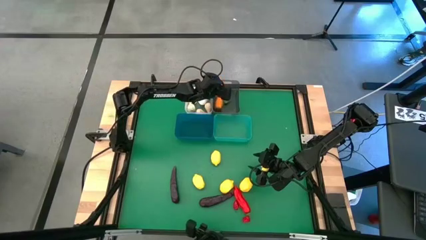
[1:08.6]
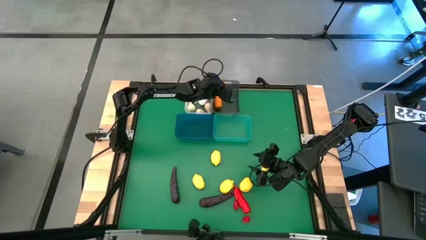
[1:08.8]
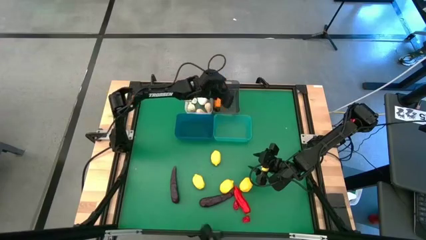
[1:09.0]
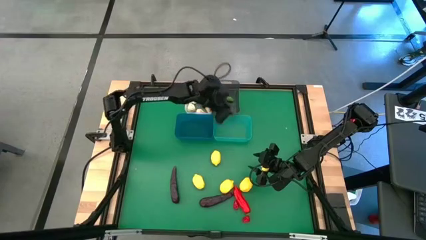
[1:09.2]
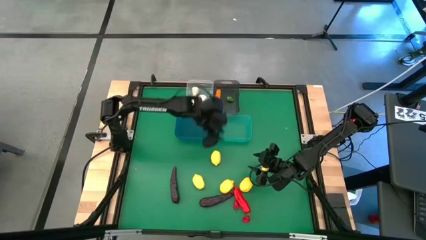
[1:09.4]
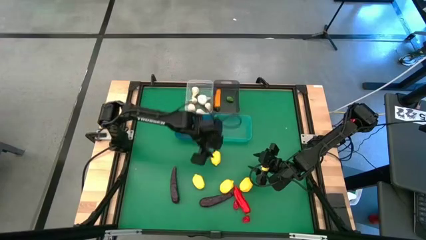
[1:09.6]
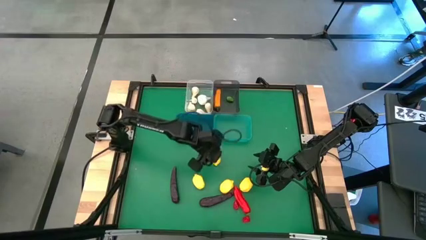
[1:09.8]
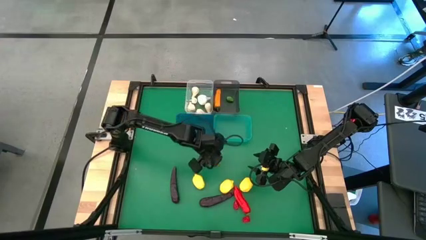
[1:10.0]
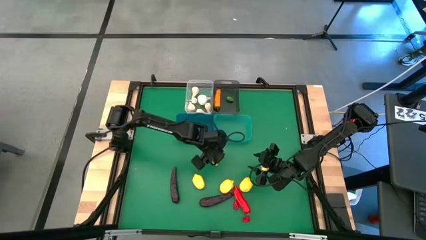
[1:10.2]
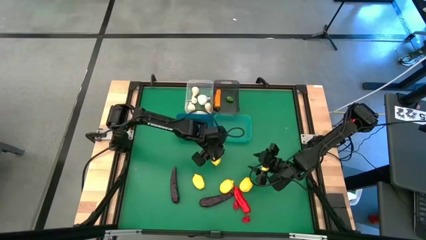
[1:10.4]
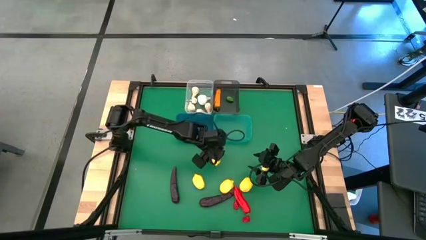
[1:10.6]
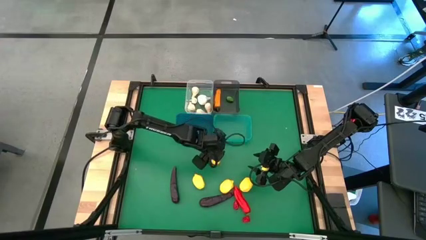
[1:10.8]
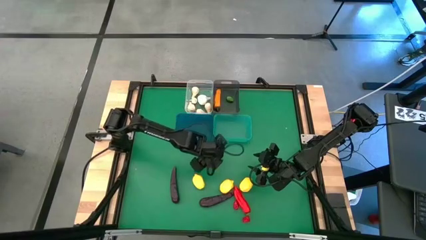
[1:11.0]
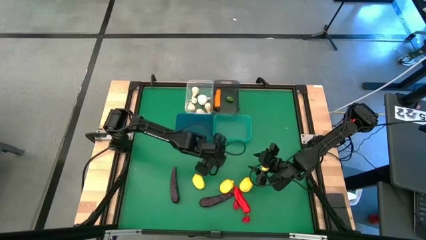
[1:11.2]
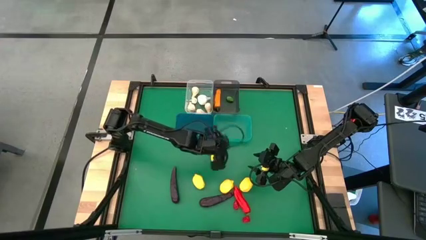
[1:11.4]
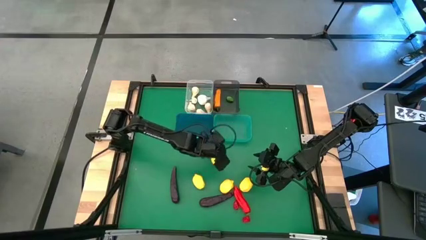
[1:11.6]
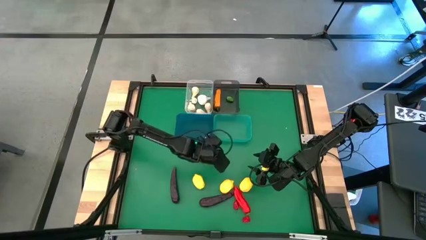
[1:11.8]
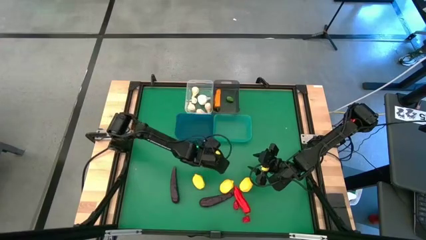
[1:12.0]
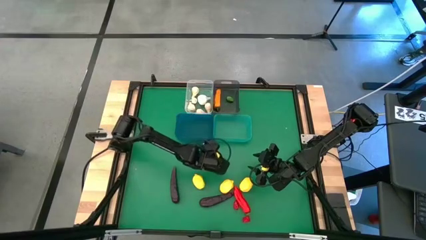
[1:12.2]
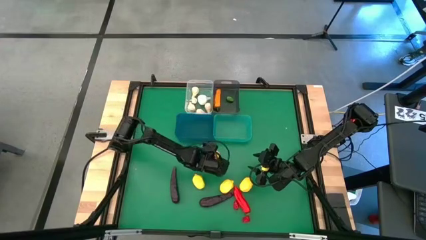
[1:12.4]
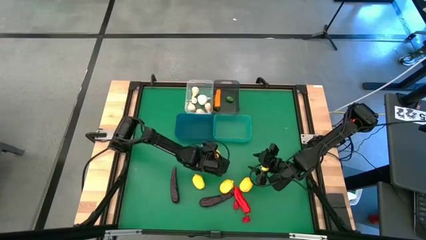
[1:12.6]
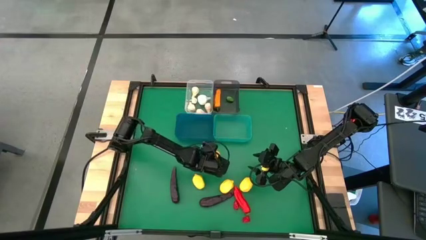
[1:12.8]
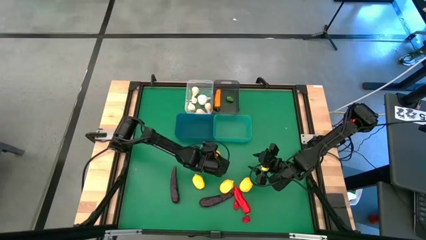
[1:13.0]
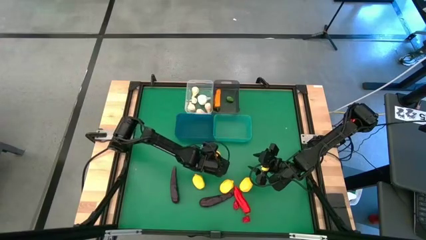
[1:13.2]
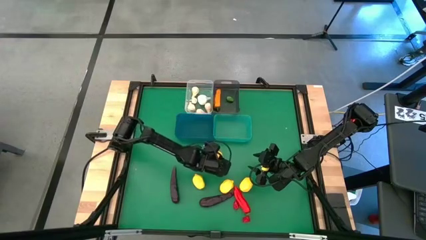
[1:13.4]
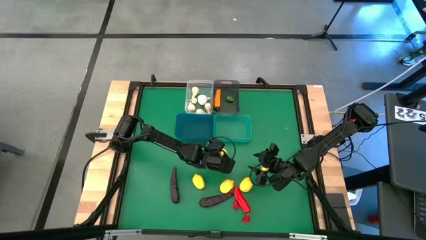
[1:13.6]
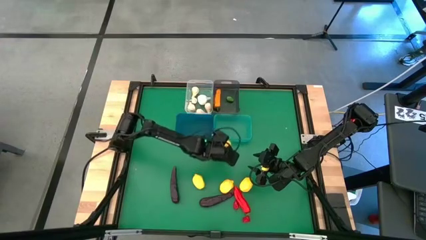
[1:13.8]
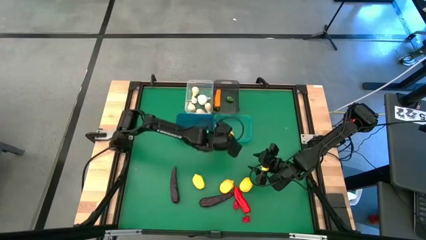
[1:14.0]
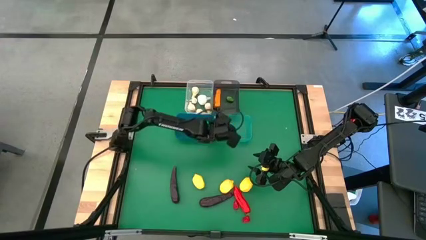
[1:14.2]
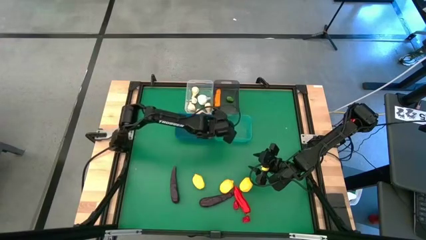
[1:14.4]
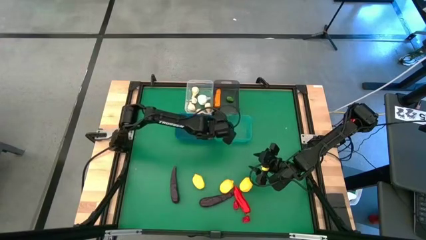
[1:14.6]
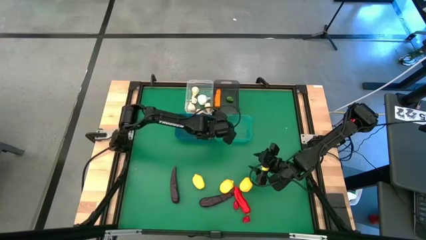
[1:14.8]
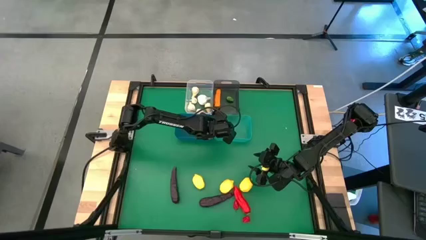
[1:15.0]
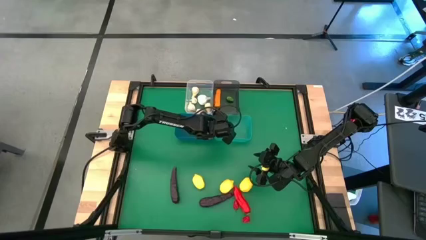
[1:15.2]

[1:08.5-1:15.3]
Task: Sort produce into baskets
Put the yellow lemon into the green bin

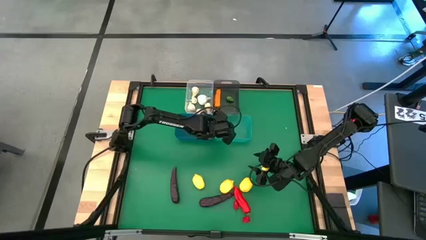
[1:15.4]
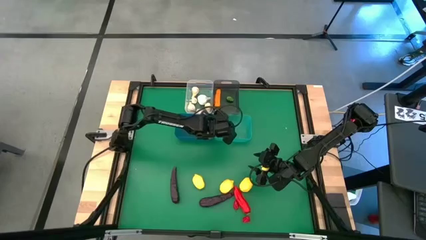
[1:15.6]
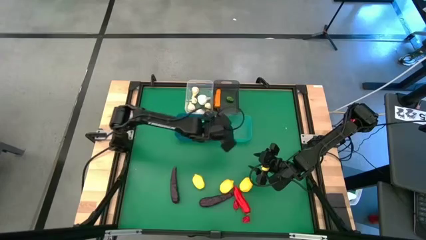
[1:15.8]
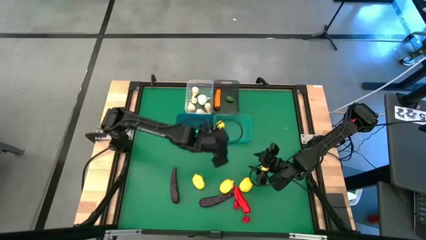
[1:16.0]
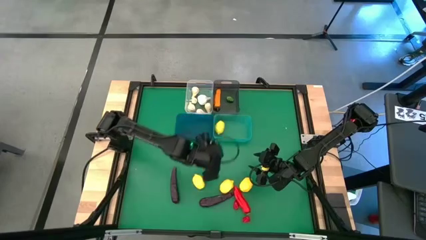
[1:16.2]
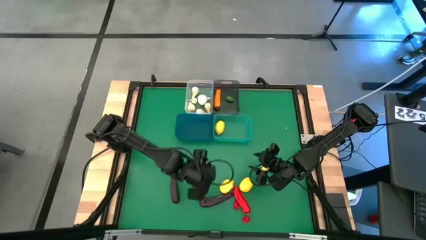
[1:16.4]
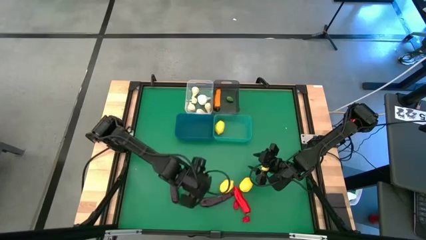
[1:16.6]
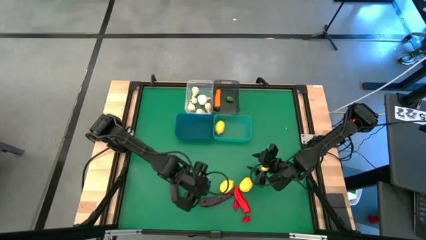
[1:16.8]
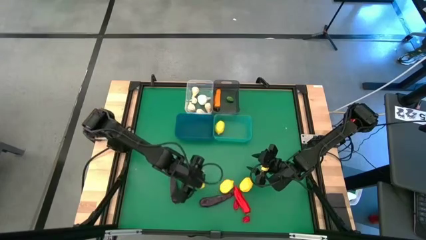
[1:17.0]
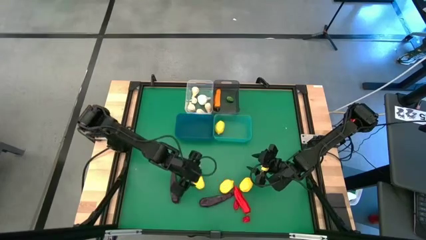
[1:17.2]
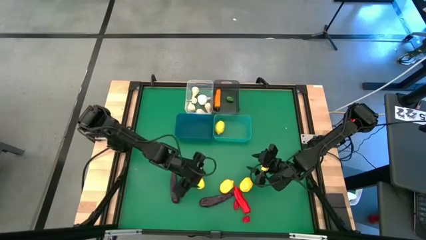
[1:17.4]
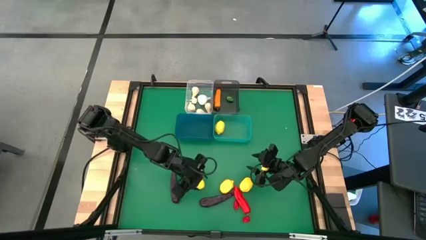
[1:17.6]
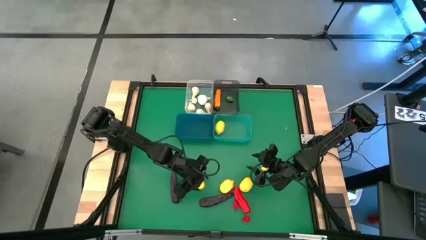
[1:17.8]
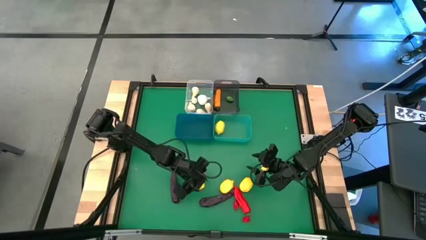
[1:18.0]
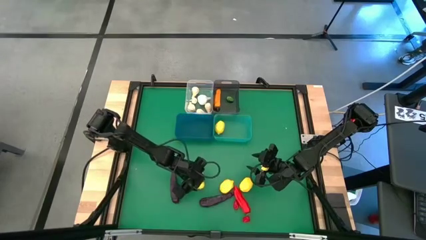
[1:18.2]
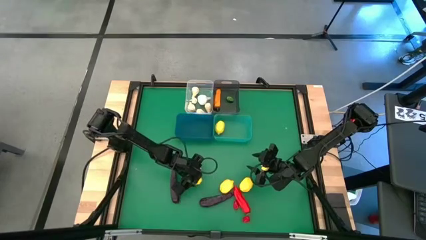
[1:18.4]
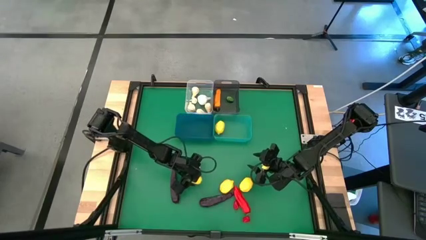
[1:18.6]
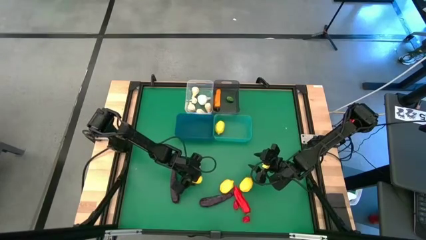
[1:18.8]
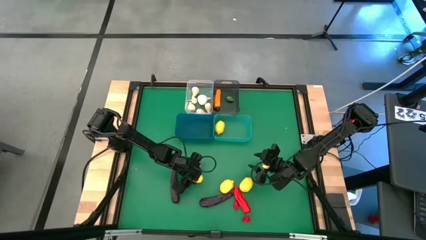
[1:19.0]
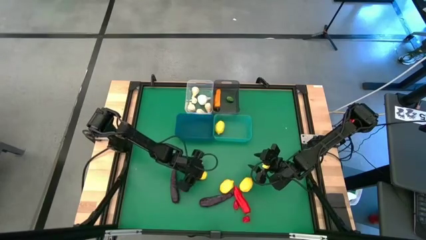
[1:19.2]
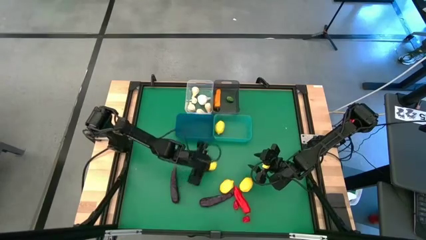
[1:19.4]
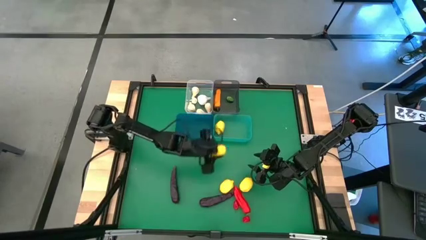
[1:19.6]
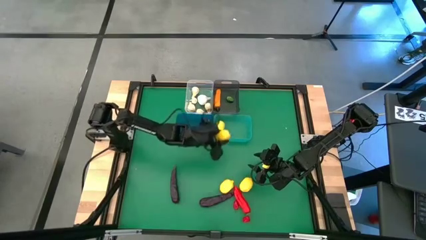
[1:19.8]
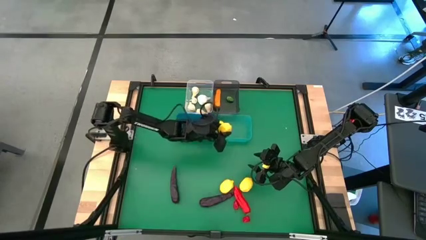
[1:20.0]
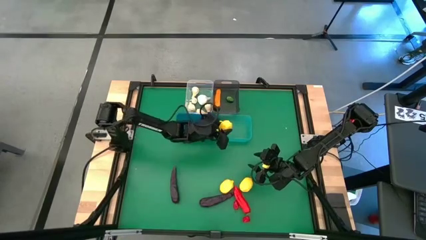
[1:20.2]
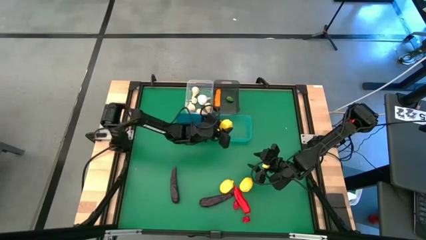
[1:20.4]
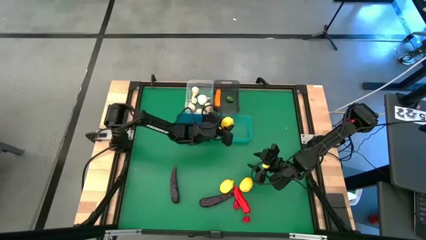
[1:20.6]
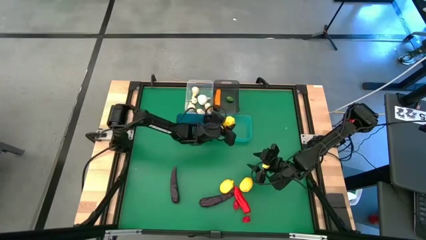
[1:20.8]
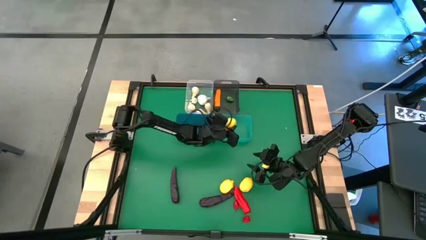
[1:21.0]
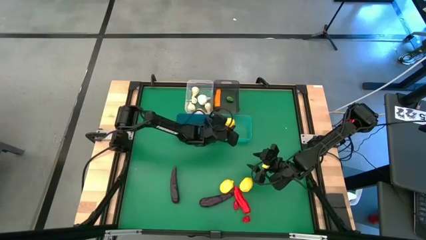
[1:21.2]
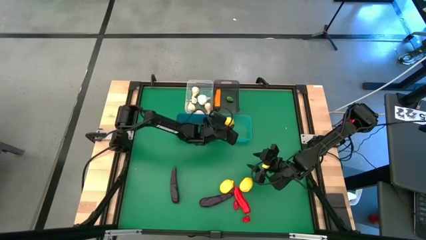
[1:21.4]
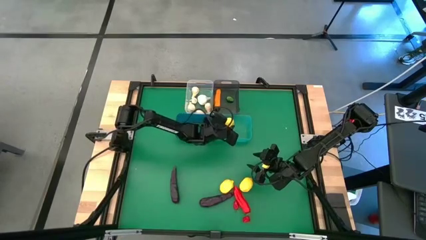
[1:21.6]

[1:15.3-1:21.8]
Put the yellow lemon into the green bin

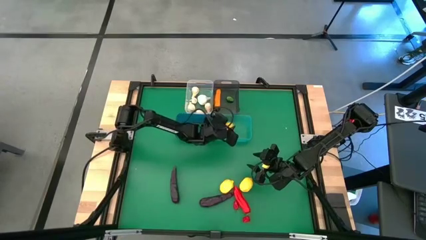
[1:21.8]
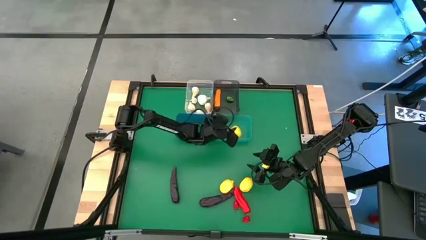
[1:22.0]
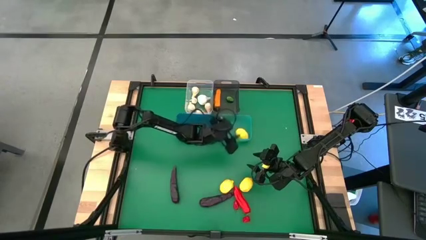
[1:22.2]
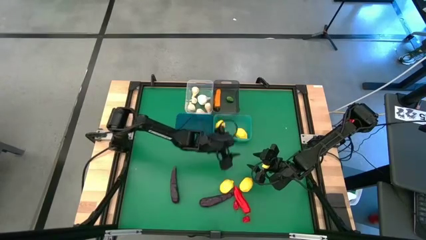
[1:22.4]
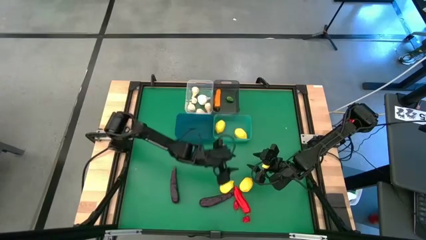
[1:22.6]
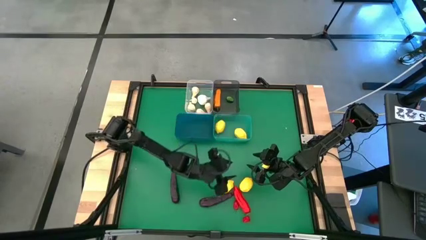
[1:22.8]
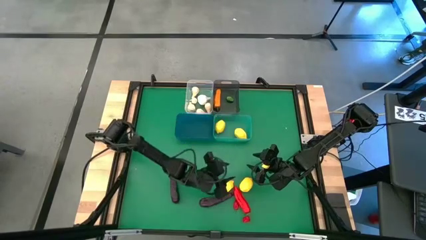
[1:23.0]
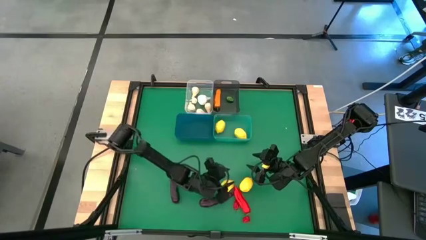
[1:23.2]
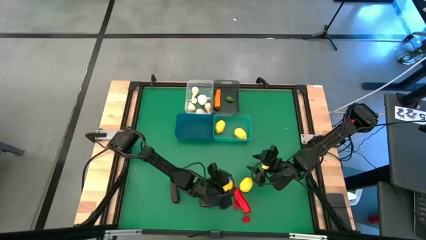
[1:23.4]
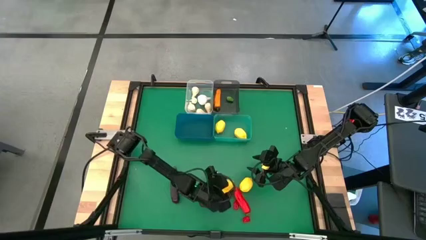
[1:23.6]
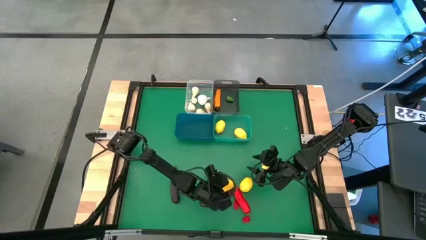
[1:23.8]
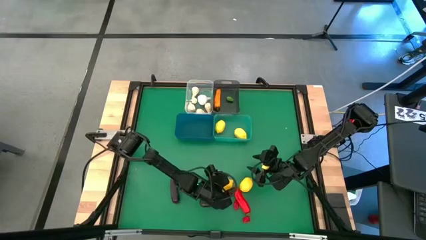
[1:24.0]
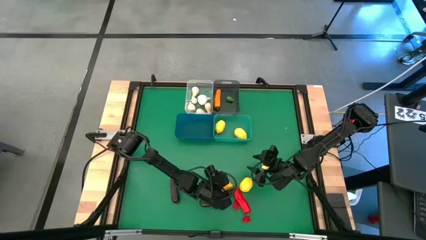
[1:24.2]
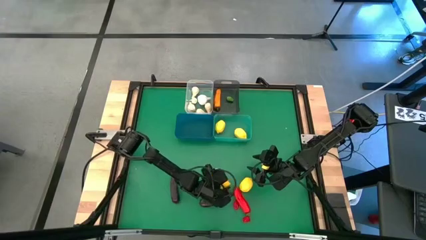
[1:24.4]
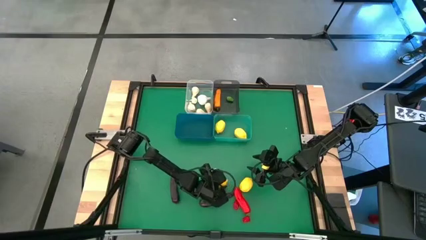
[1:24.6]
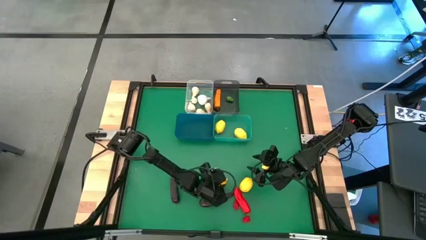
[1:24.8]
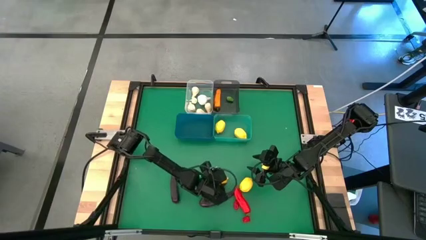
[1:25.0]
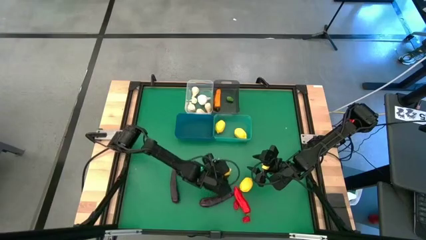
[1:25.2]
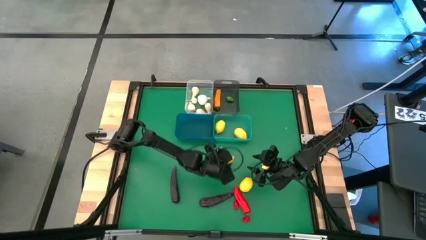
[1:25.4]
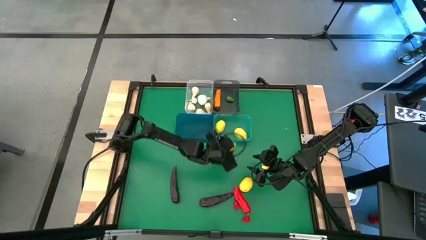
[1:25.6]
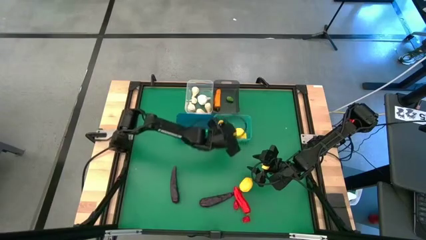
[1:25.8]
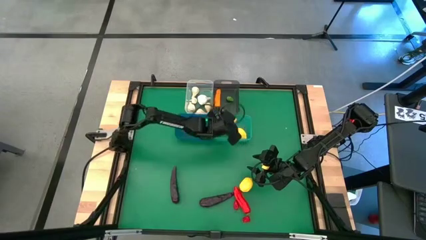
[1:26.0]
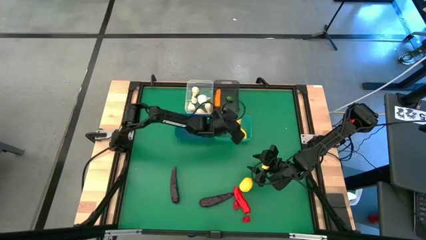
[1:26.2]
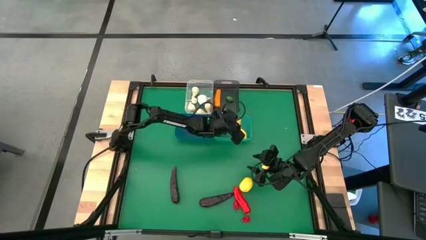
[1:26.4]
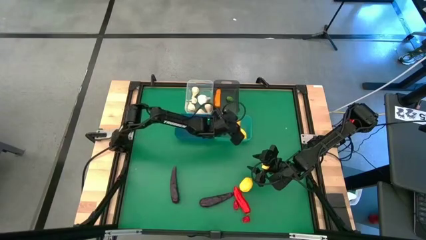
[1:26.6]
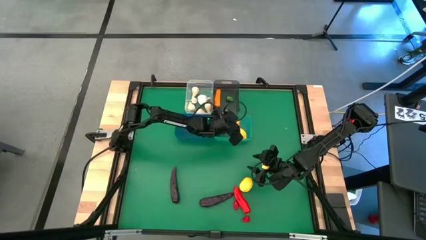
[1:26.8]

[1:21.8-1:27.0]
Put the yellow lemon into the green bin
